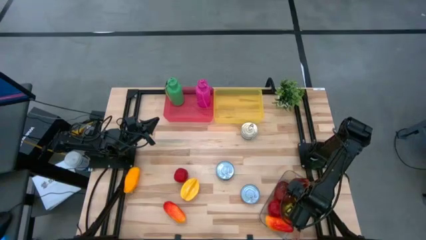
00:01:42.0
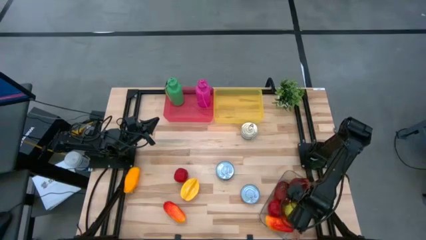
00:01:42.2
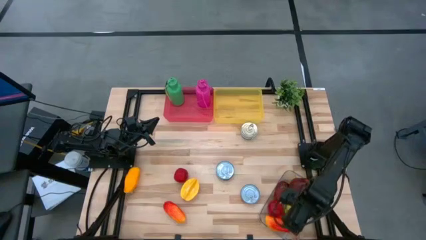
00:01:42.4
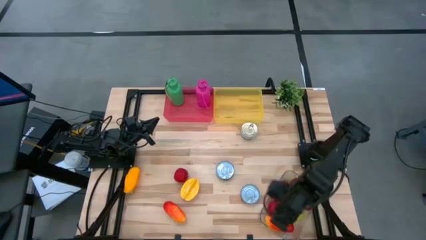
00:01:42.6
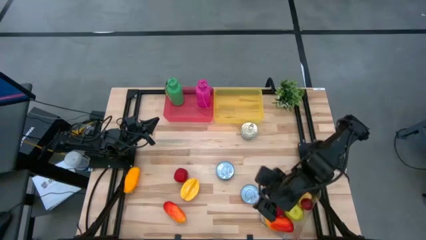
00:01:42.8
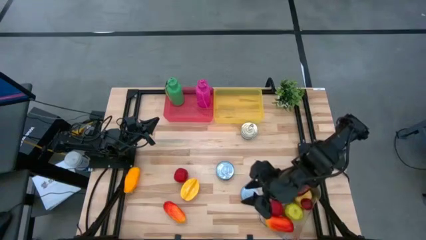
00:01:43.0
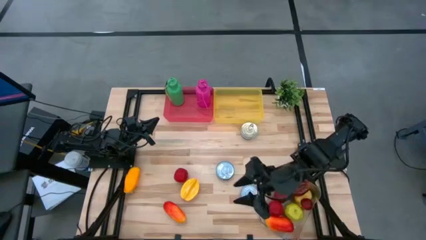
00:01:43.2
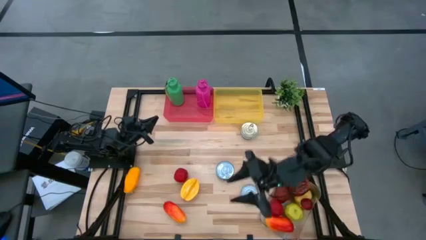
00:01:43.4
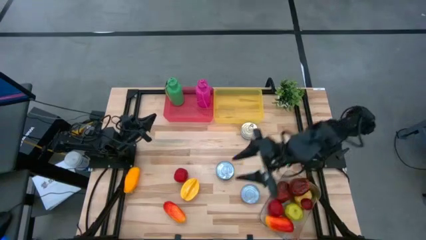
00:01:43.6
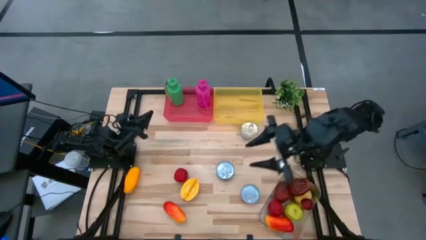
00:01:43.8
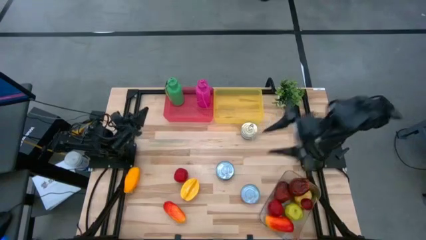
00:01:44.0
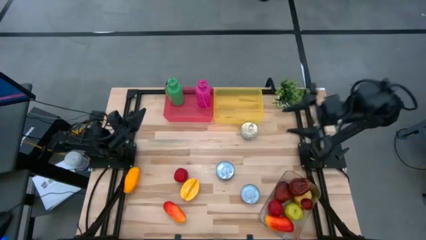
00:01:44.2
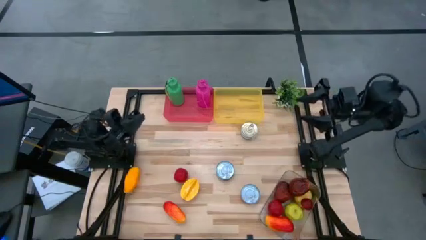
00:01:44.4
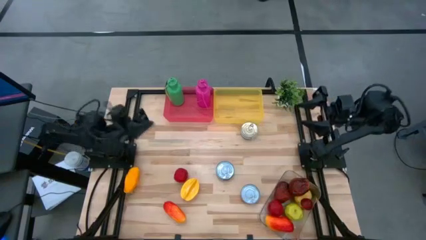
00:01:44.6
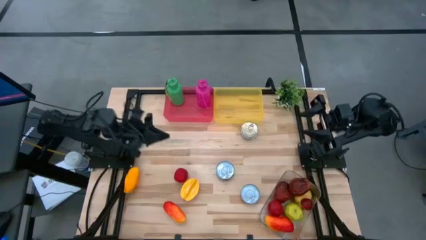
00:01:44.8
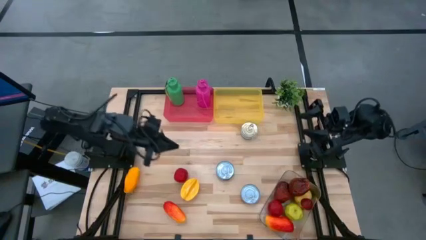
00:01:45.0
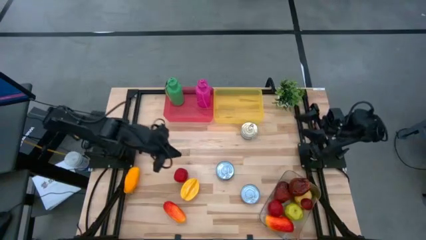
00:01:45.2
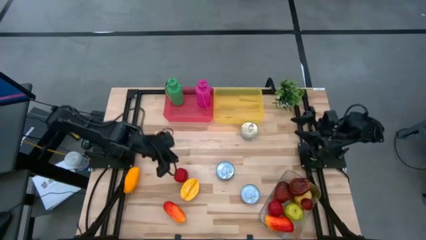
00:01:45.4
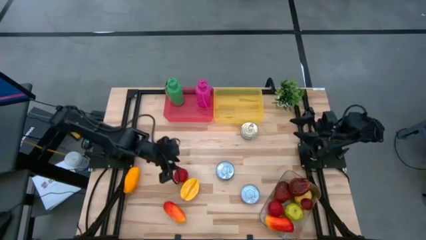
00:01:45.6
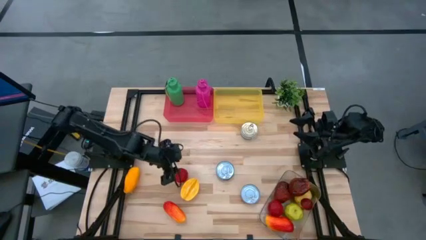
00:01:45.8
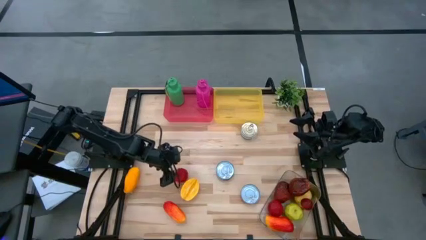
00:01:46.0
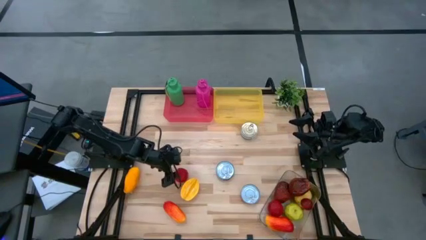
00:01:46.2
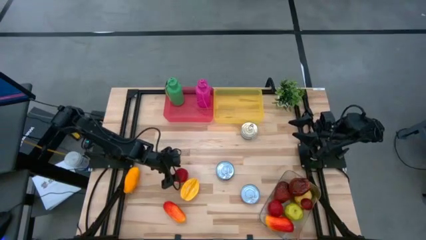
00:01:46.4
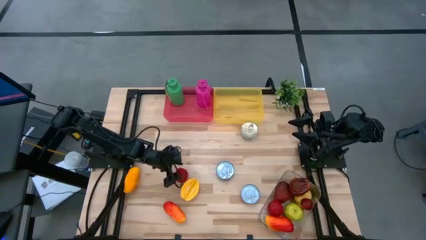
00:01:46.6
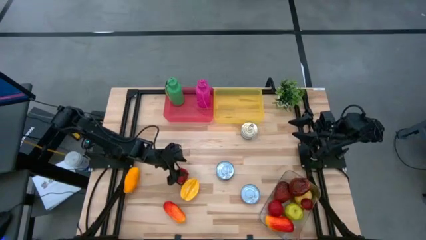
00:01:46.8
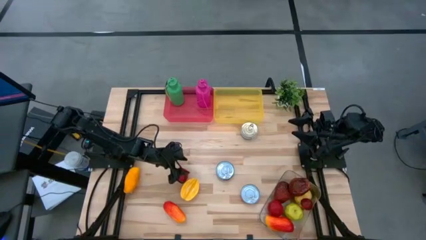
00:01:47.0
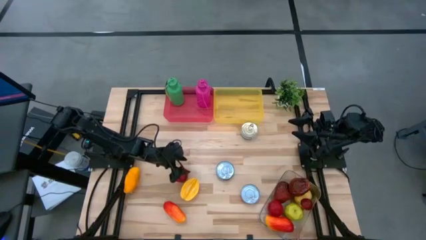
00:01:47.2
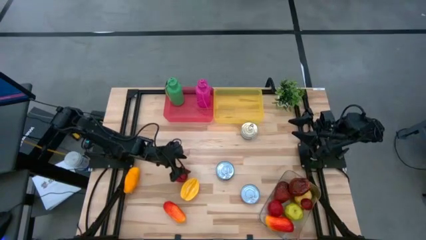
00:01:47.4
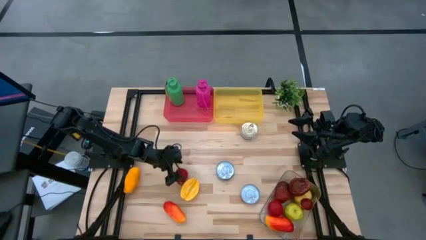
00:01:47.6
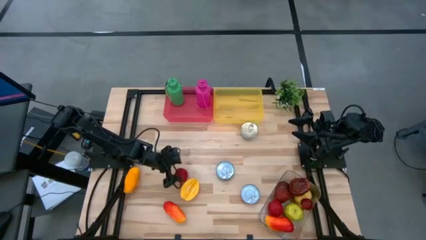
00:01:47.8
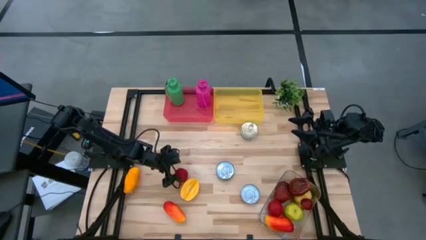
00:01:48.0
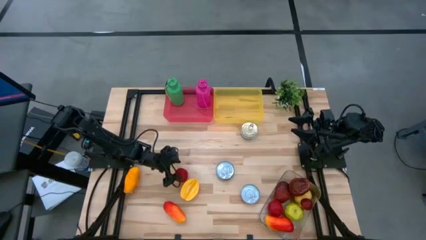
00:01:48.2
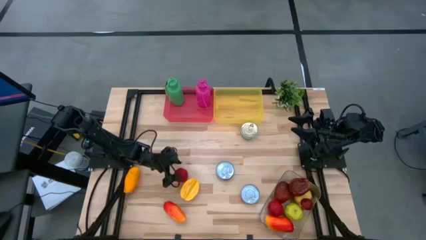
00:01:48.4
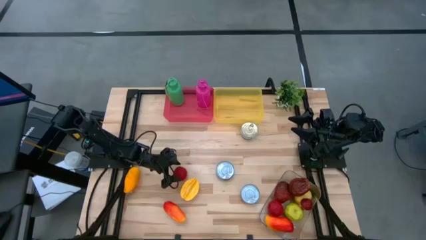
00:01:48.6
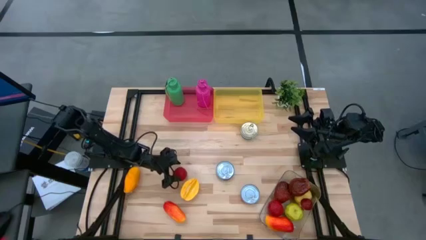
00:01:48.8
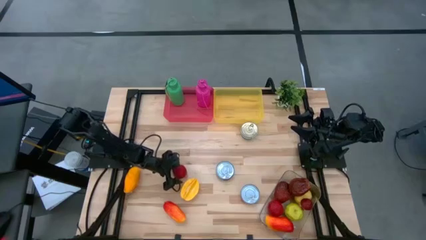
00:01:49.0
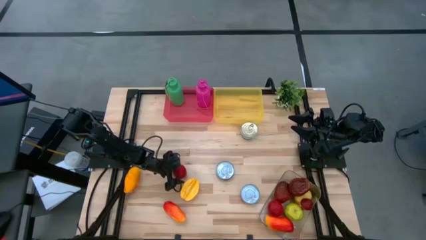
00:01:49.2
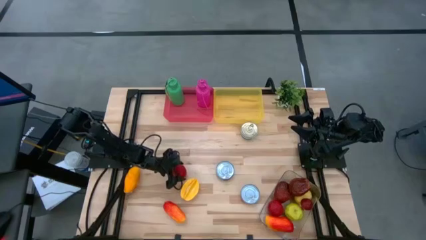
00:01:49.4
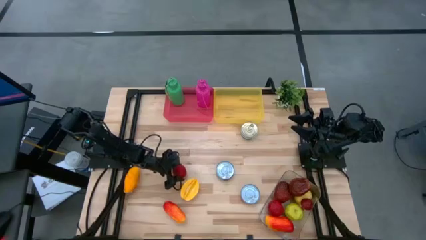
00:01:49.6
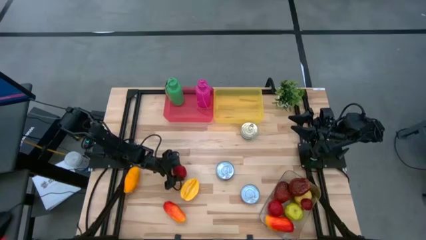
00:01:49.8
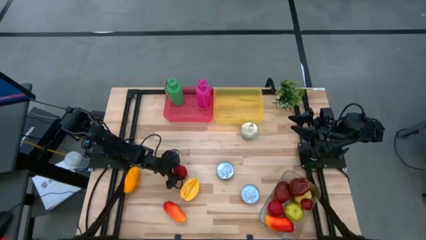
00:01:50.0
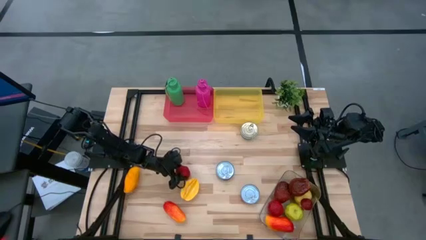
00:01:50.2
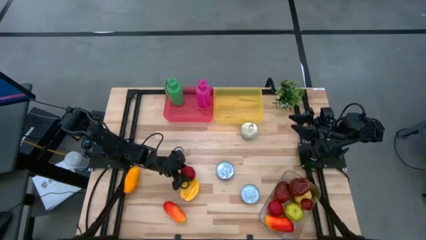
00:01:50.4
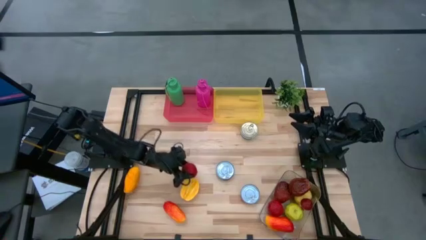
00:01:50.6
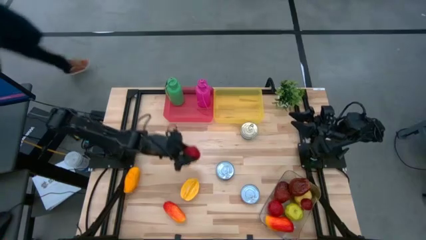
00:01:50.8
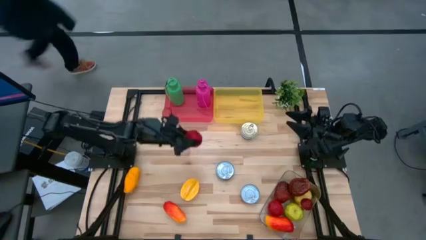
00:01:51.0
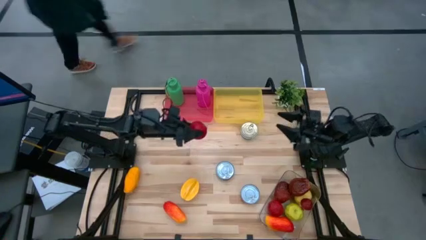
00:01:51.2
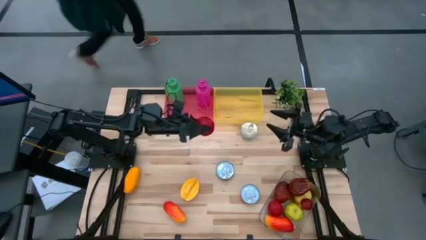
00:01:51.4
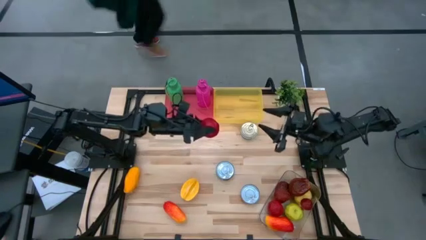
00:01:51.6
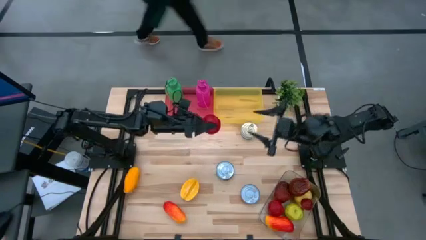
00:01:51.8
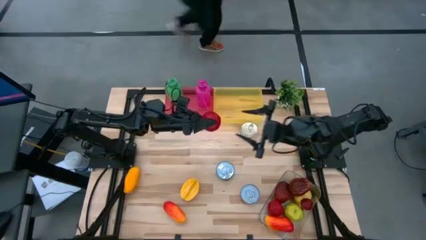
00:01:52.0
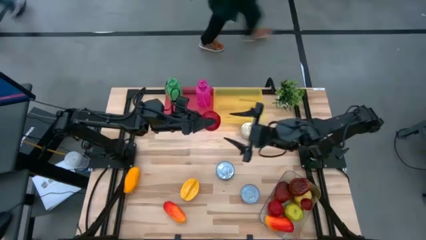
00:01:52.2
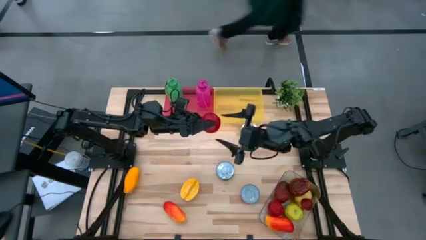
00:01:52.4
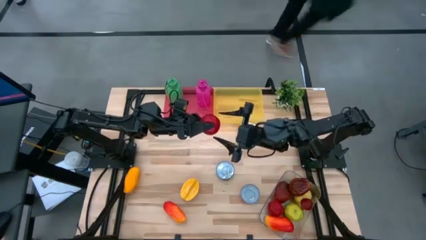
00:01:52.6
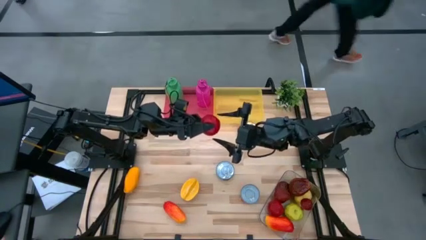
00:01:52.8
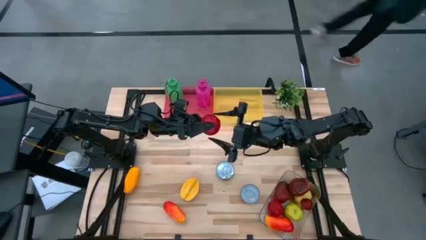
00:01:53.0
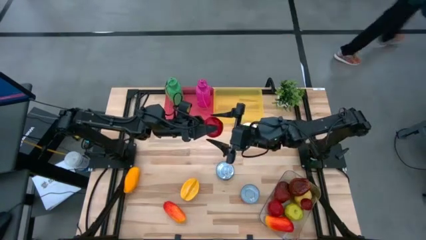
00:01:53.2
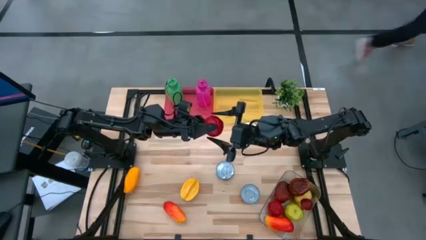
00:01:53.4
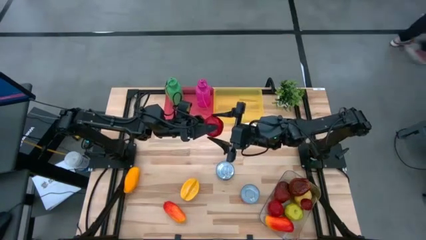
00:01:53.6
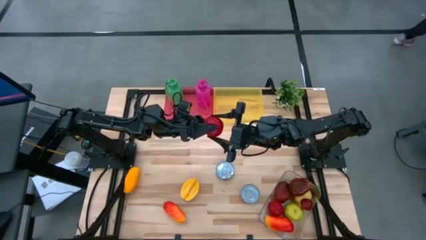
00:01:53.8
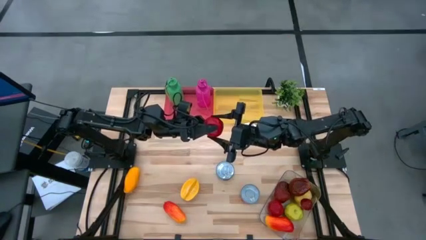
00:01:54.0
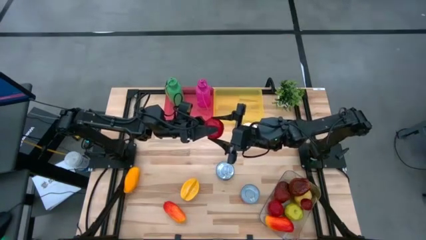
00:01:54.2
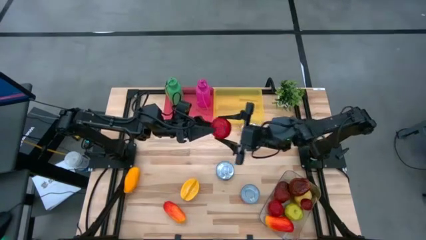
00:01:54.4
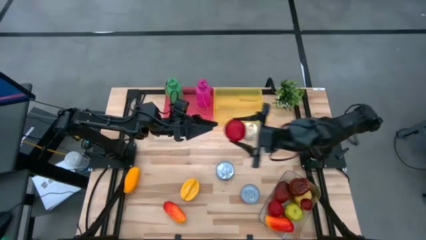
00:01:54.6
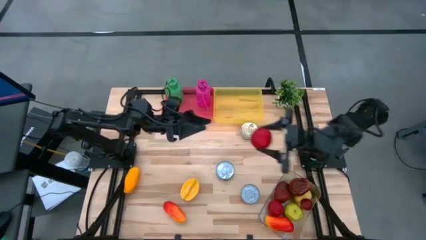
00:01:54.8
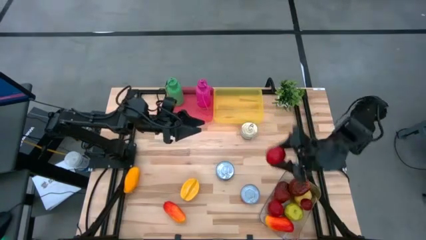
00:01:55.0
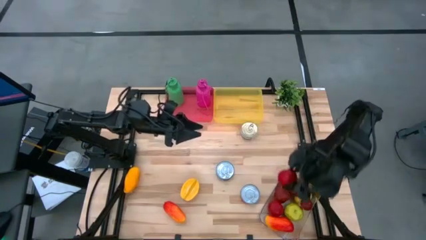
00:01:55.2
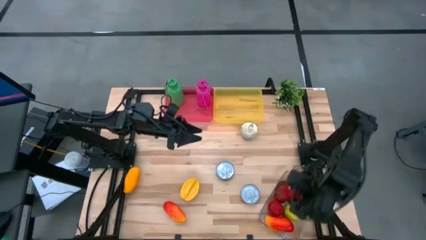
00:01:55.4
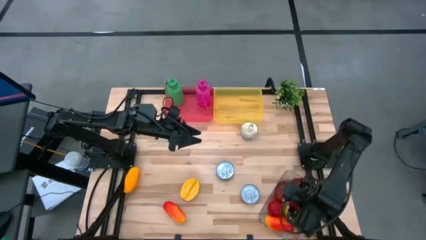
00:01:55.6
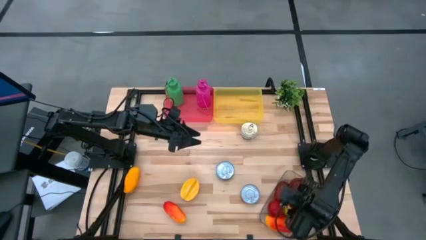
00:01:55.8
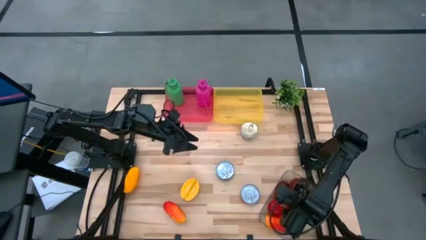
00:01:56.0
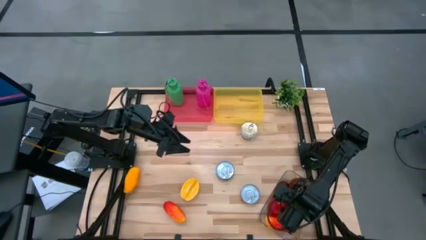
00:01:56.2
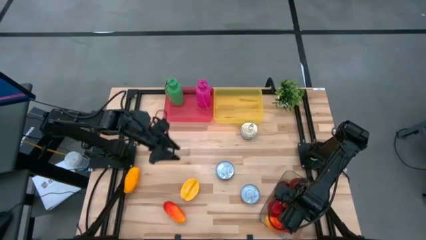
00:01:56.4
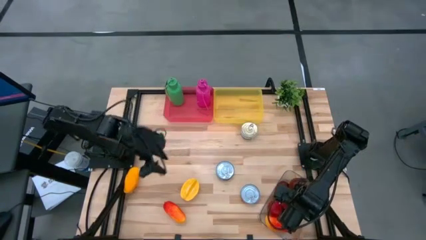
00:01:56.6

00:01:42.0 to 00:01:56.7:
Task: Pick & Place Food Item
Put the apple into the transparent bin
